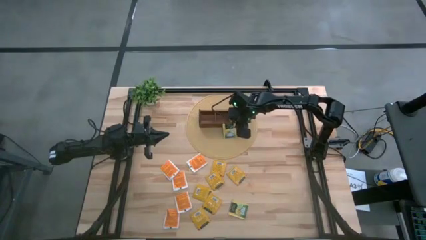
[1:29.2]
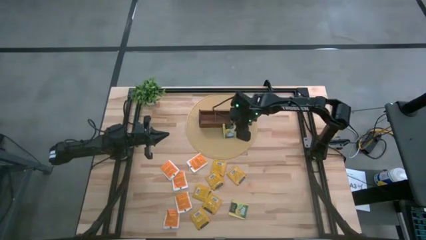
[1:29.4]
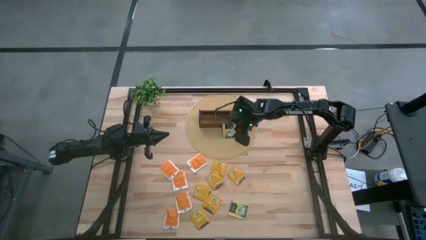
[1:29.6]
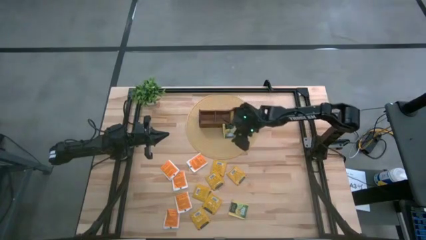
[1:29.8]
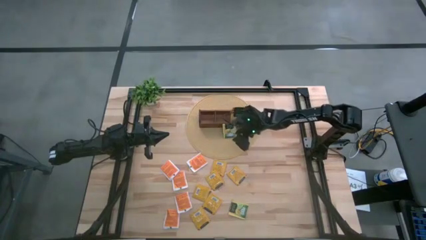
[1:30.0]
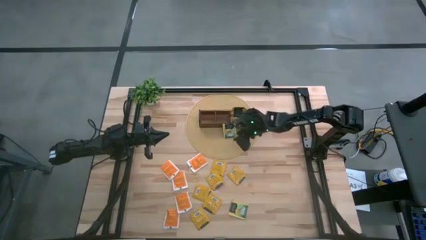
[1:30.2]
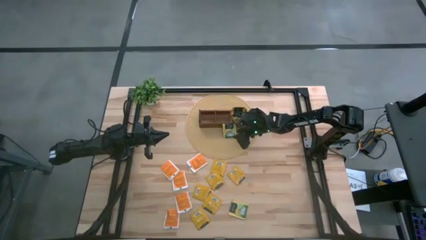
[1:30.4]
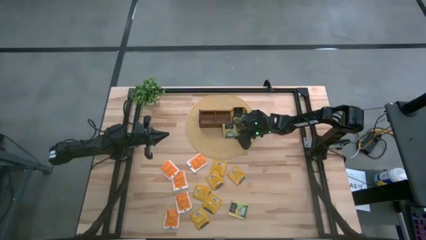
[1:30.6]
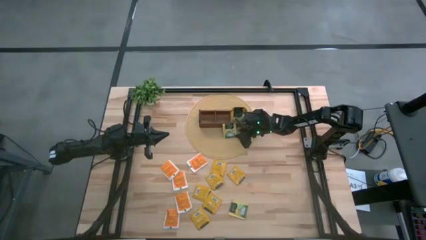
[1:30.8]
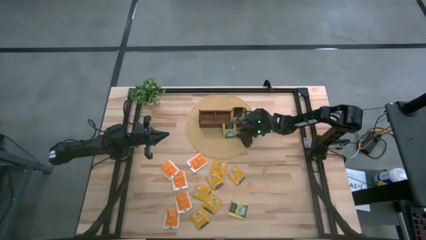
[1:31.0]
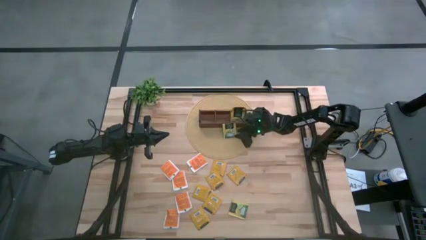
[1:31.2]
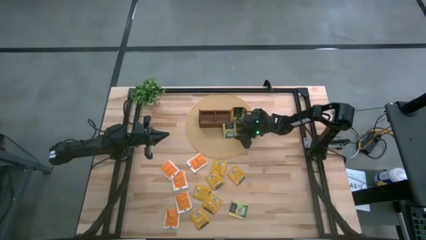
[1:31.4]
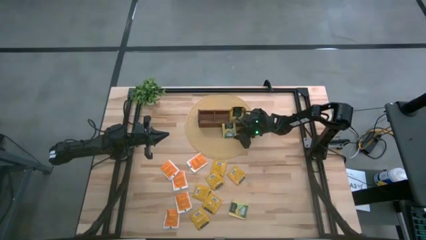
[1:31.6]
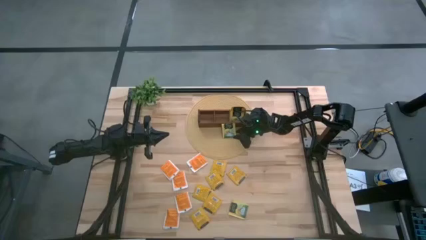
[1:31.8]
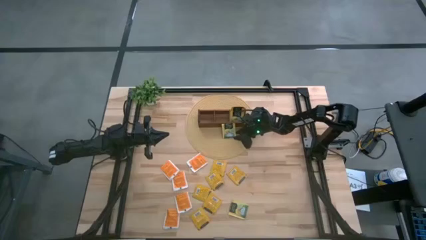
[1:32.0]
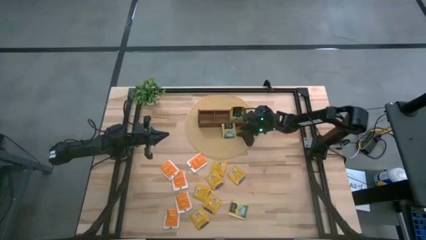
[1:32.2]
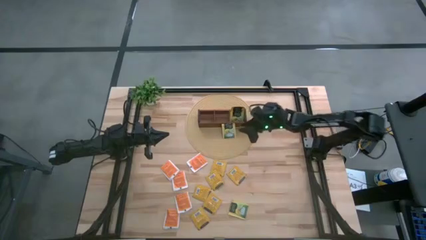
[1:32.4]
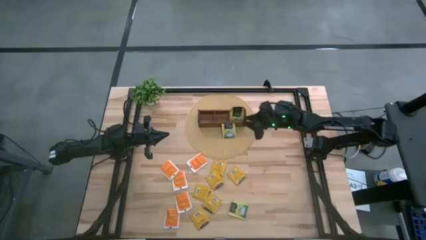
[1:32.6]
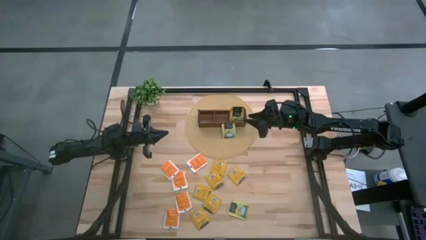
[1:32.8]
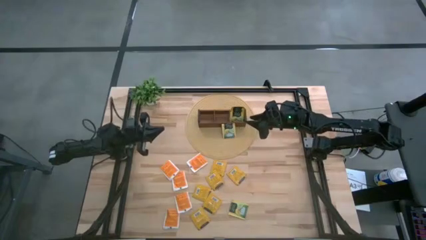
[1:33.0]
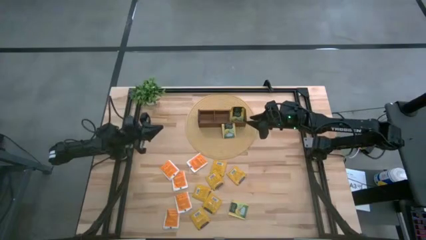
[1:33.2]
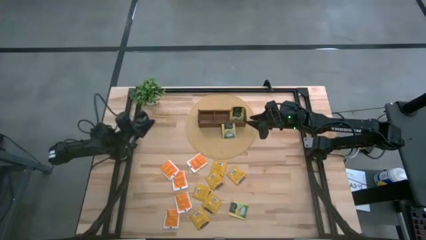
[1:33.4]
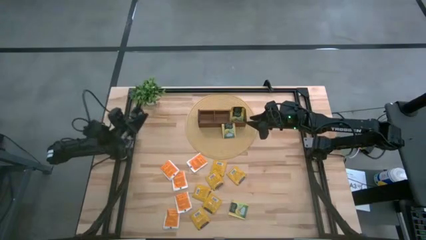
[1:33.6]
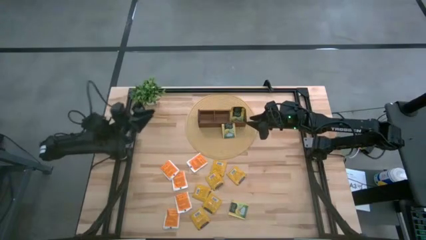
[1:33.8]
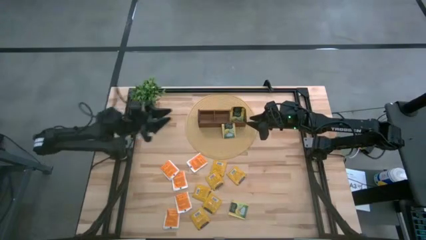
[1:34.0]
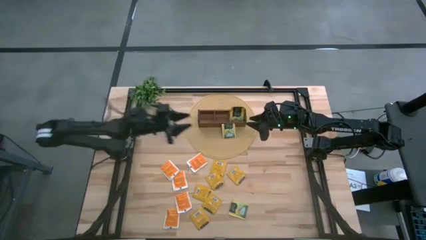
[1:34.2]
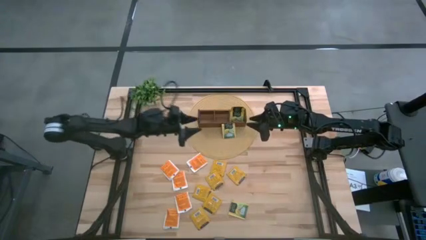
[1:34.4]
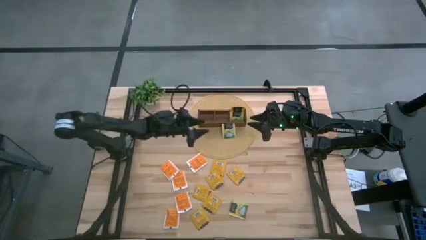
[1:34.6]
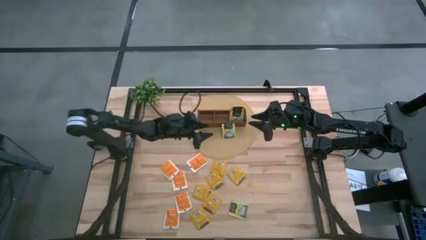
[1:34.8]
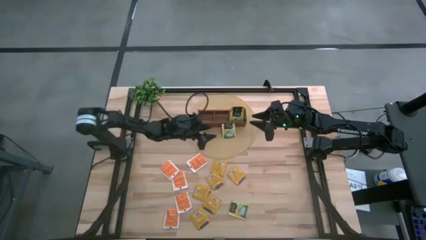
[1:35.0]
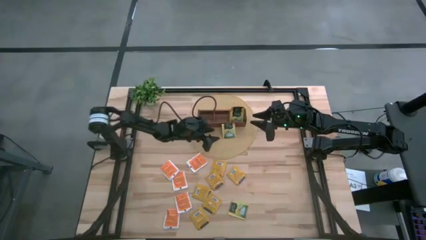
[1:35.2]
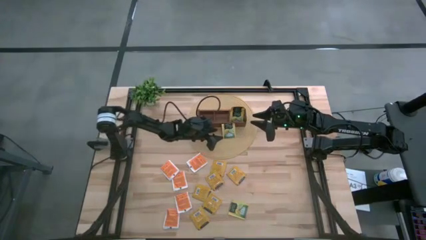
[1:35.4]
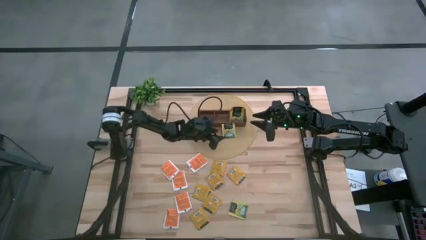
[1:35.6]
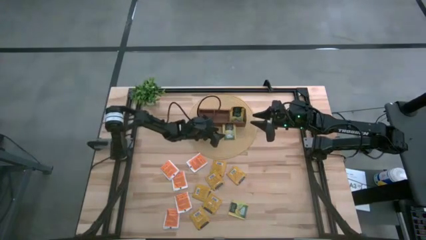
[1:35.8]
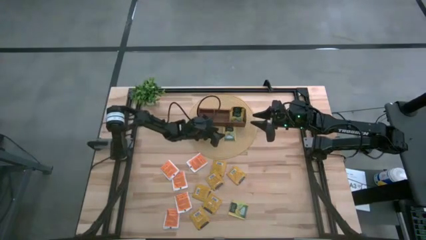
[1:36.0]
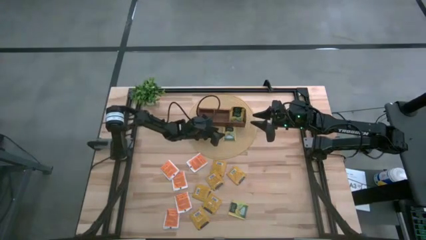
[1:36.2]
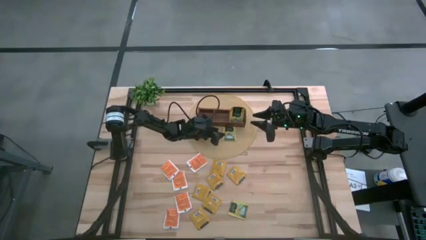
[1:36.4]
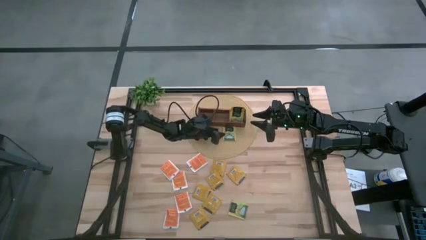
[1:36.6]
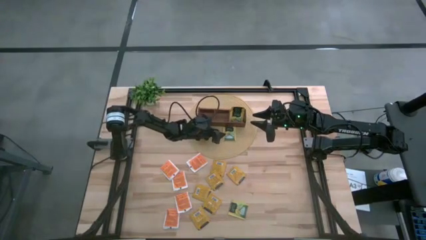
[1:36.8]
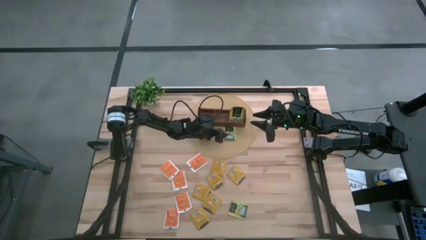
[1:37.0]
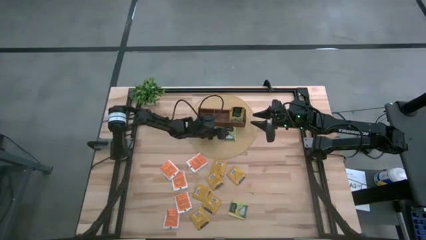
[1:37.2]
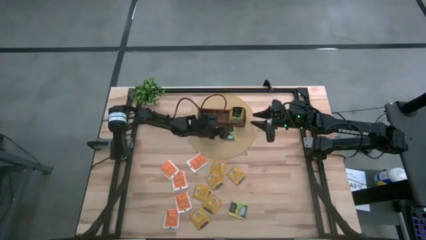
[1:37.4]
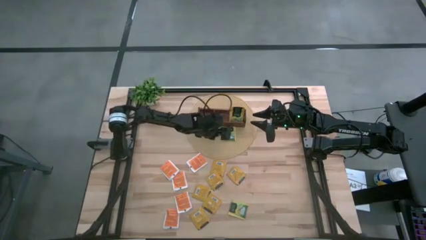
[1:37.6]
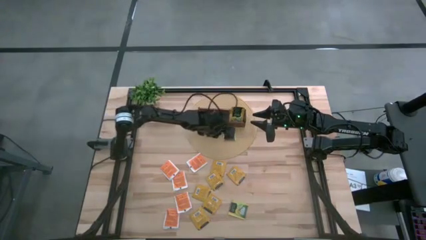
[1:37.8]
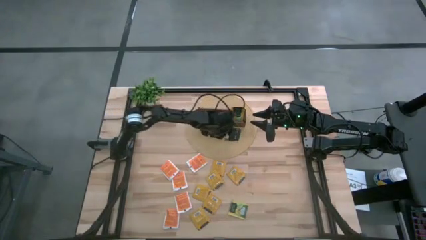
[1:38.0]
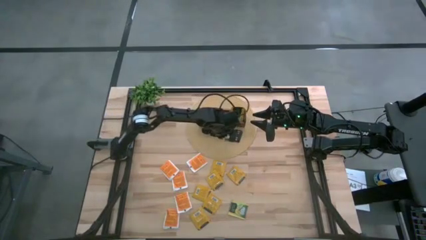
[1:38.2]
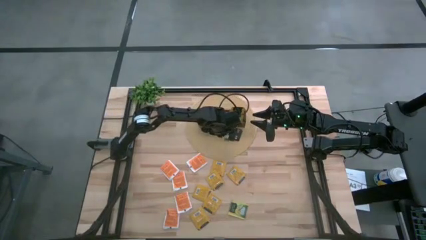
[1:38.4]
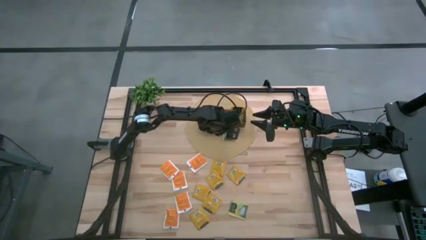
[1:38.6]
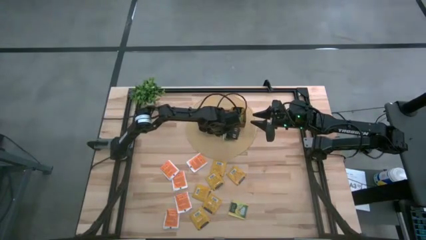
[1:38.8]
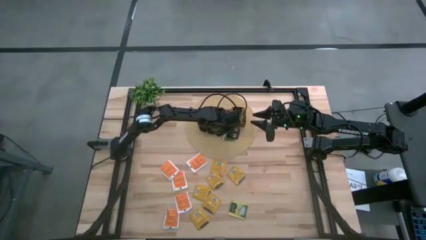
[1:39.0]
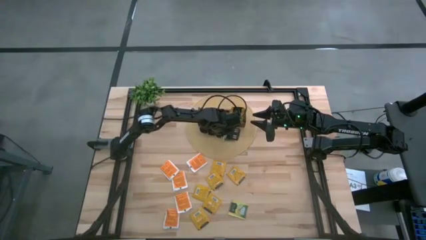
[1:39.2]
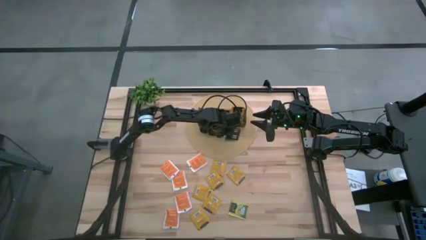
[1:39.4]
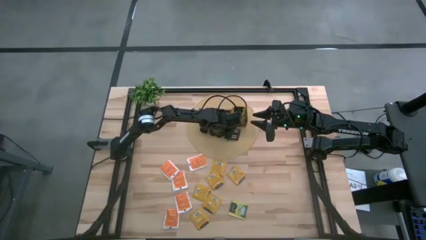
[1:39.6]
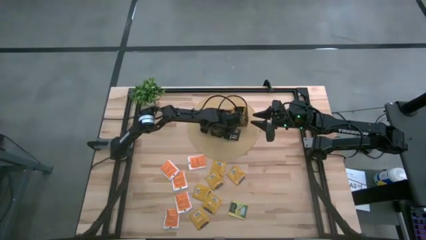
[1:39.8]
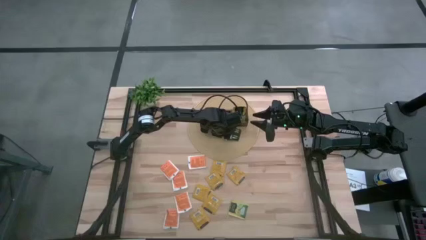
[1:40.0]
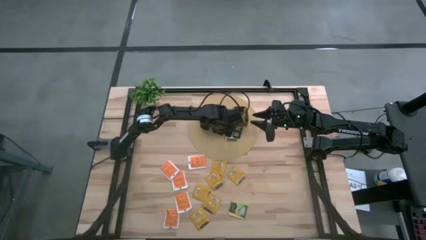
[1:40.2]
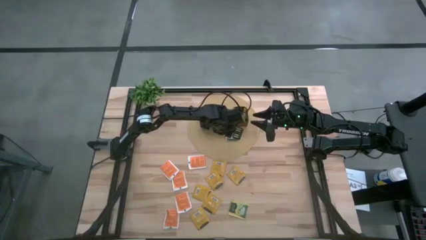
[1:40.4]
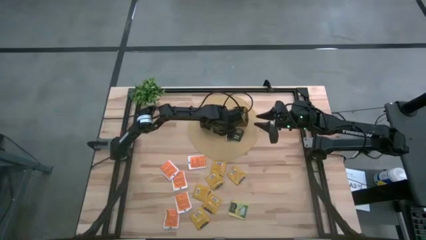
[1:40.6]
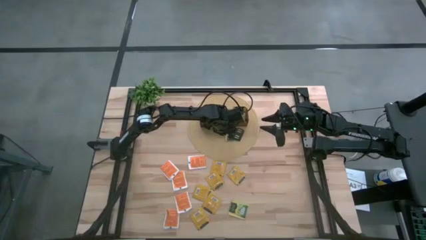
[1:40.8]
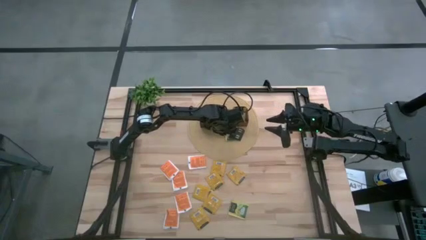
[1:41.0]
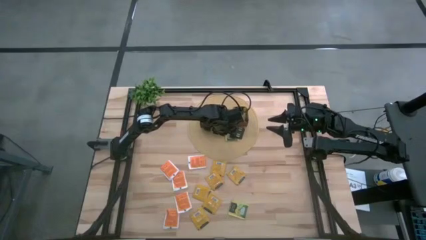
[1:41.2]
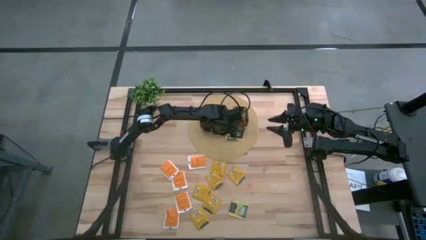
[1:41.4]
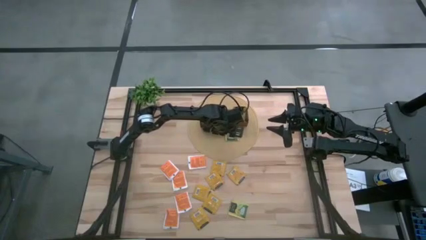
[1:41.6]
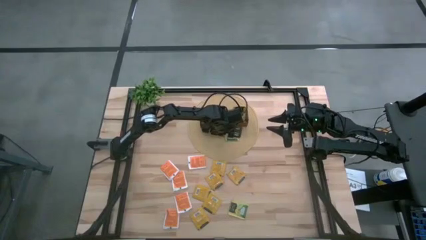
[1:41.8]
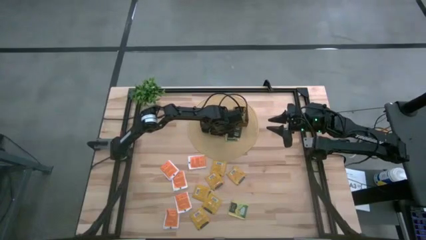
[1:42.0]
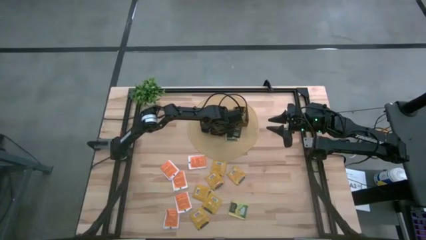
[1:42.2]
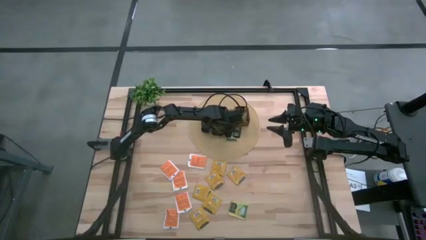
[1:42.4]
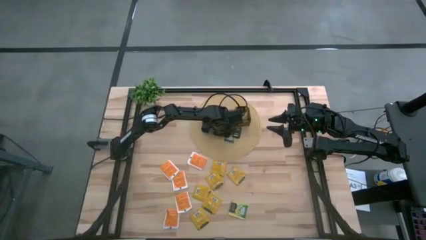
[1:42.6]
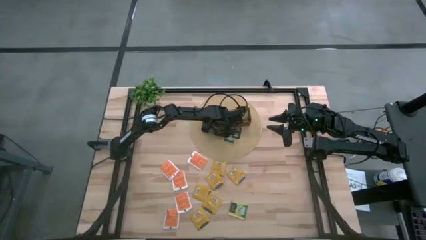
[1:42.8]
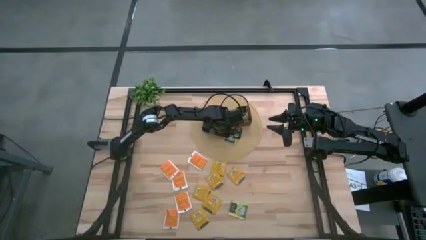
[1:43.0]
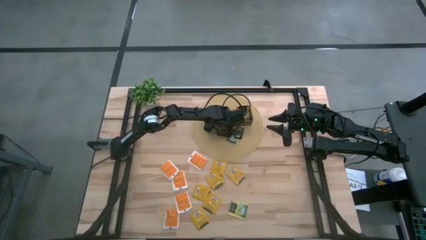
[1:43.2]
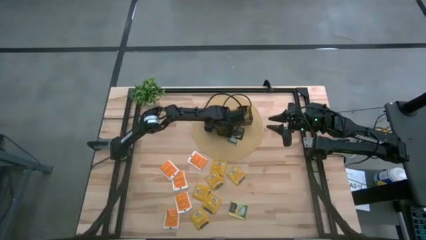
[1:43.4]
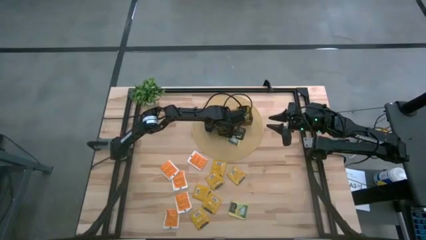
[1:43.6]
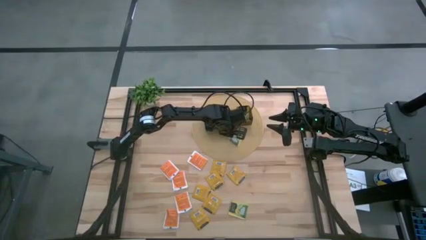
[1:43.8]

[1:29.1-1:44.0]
Task: Pick & Place Tea
Put the right yellow tea bag into the right section of the wooden organizer
